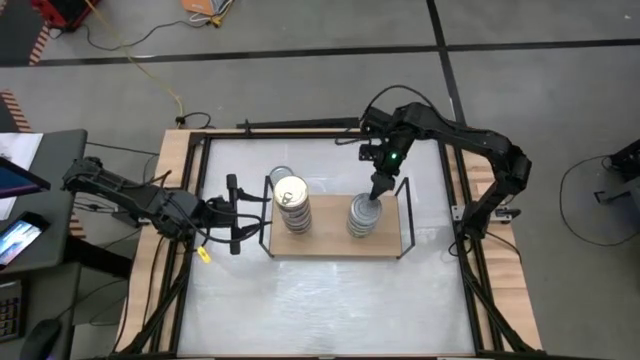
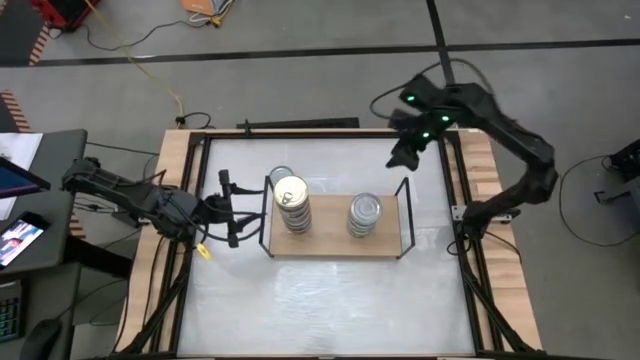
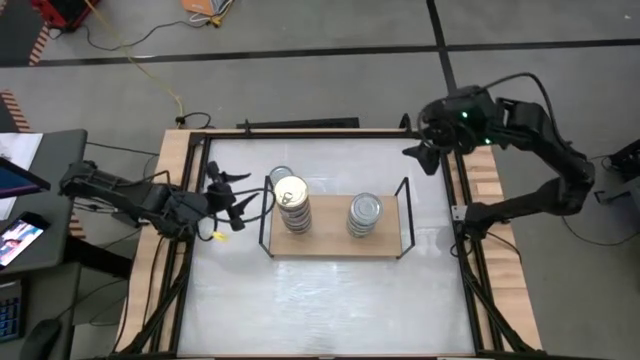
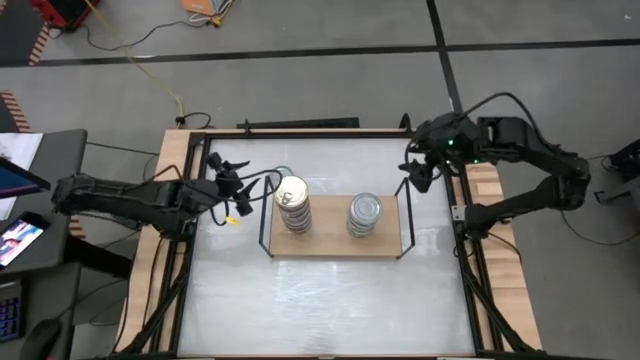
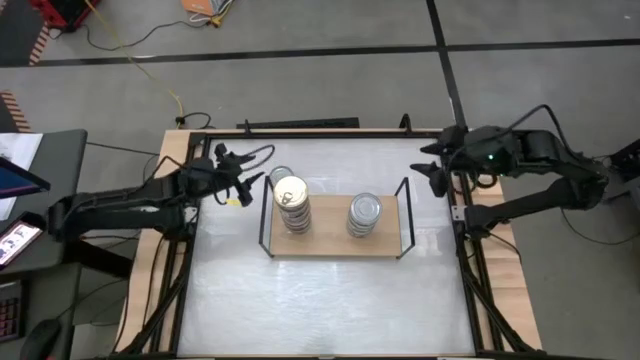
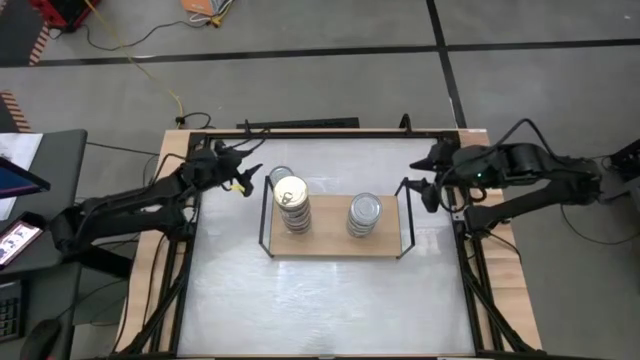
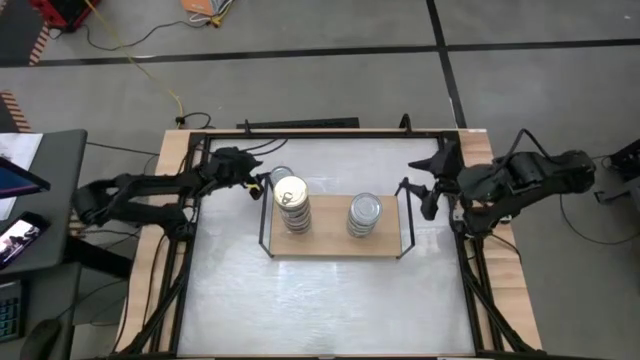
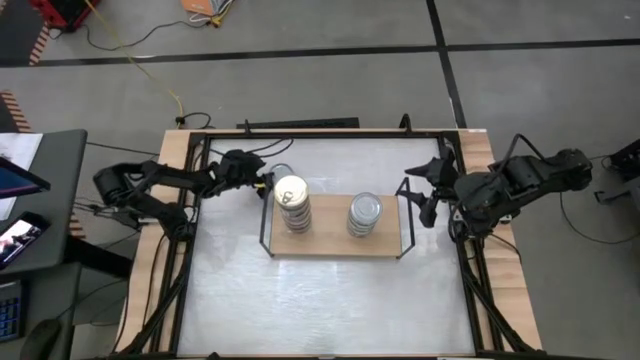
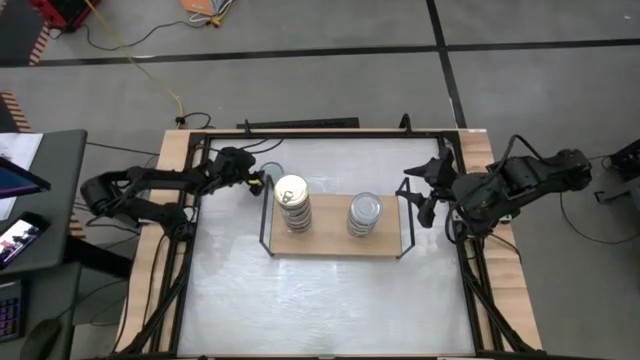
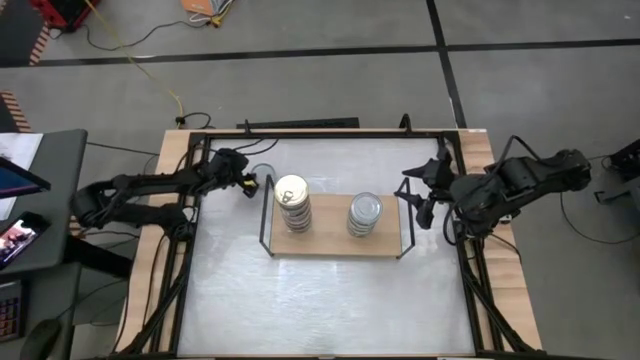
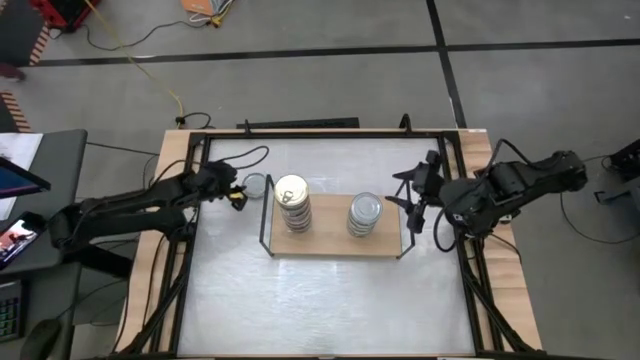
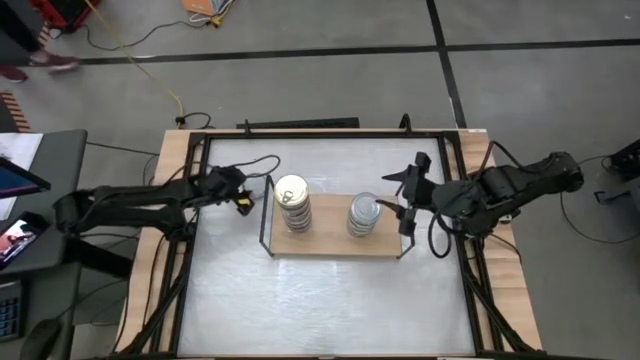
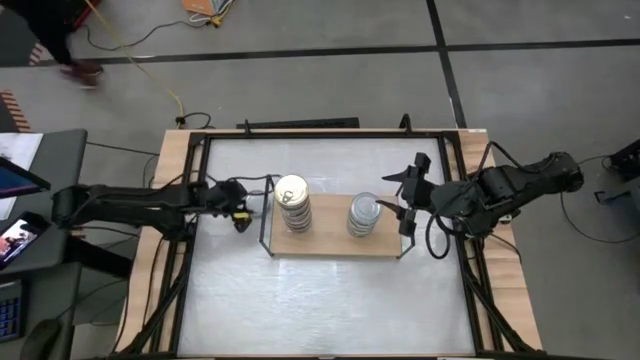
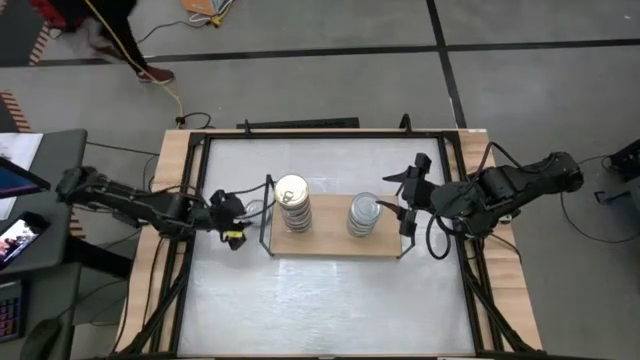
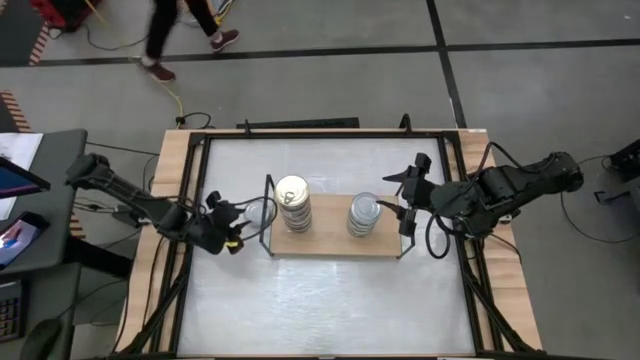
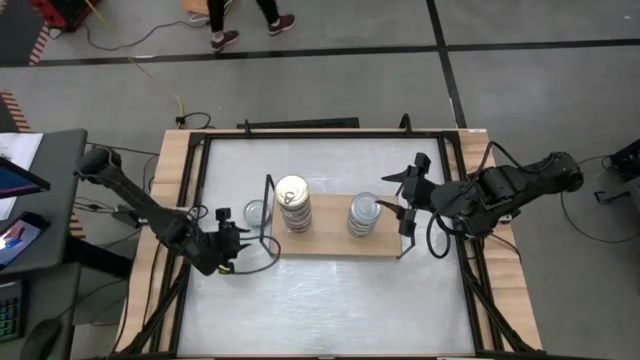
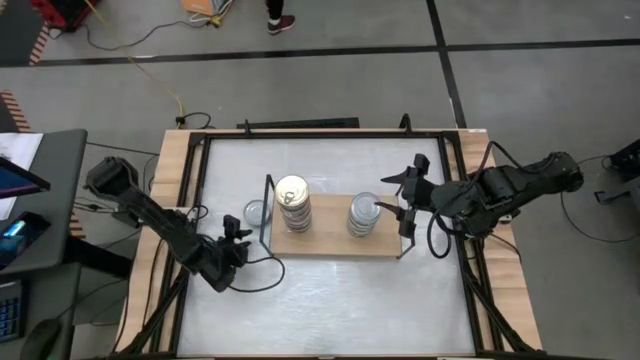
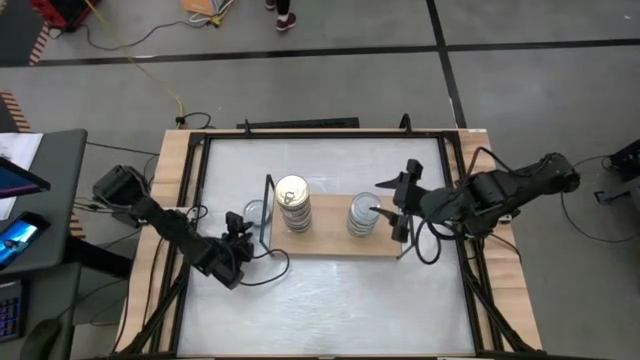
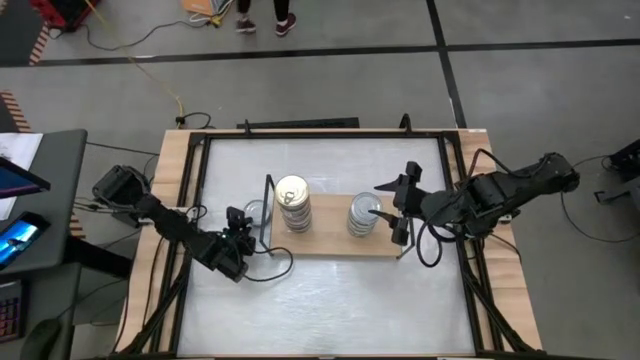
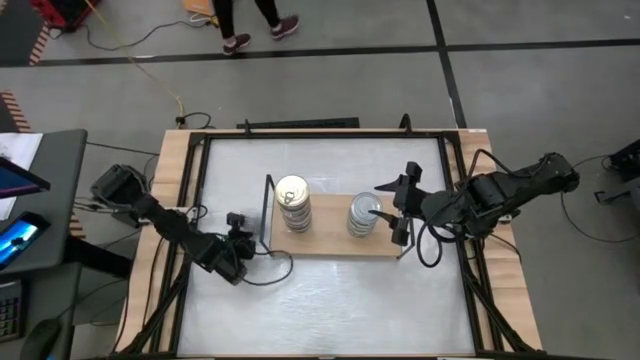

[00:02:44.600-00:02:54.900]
Task: Stack canned seafood by type on shelf
Stack the green tuna can on top of the green tuna can on the shelf

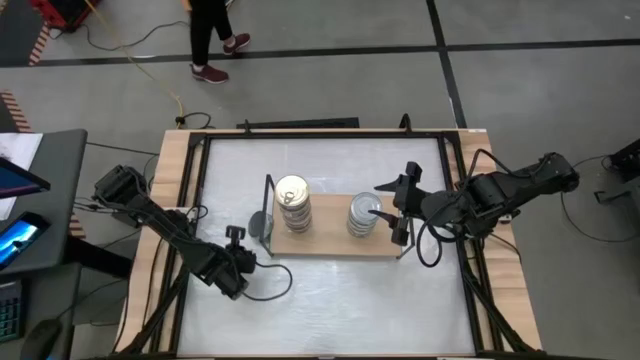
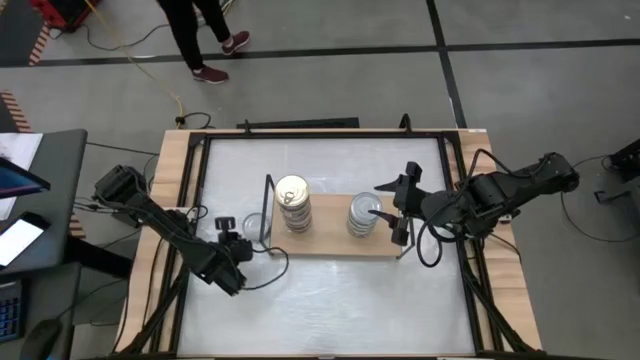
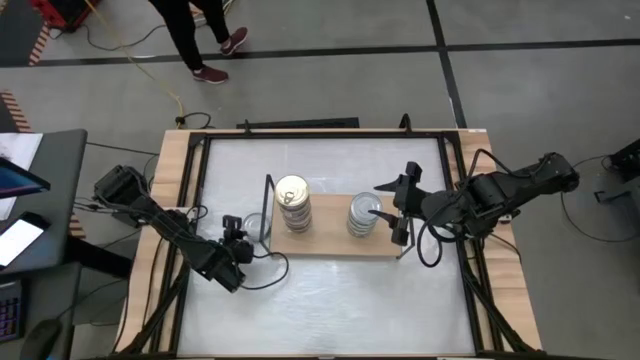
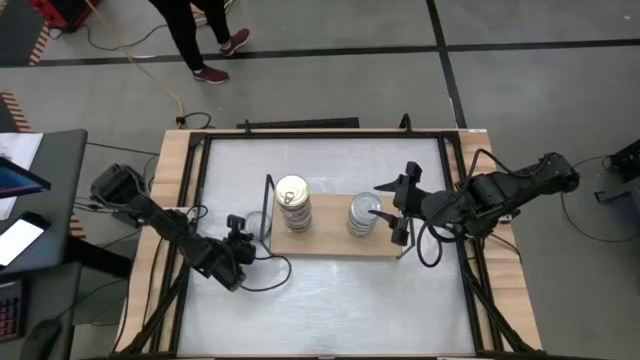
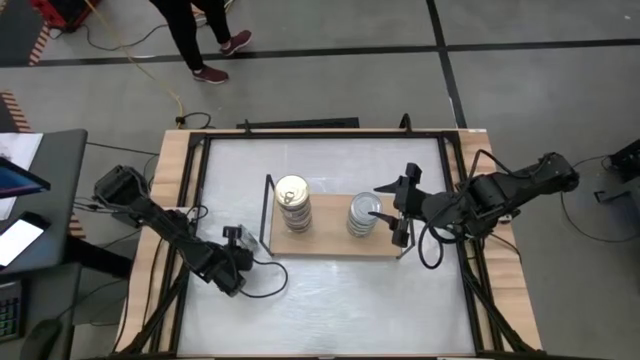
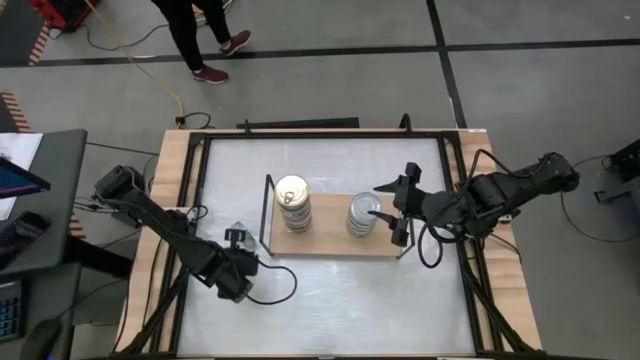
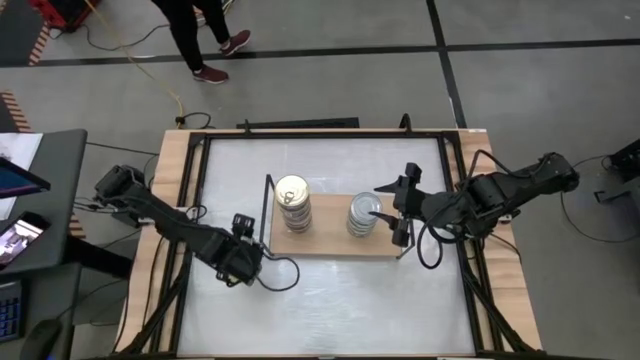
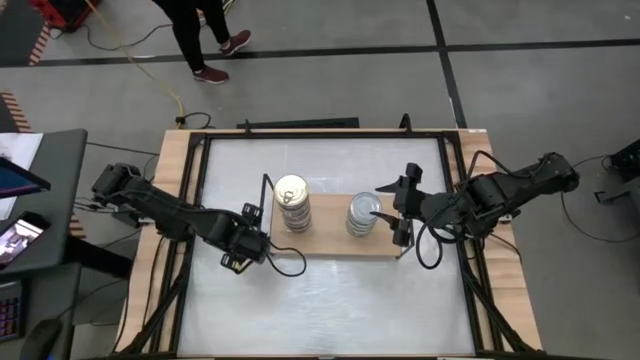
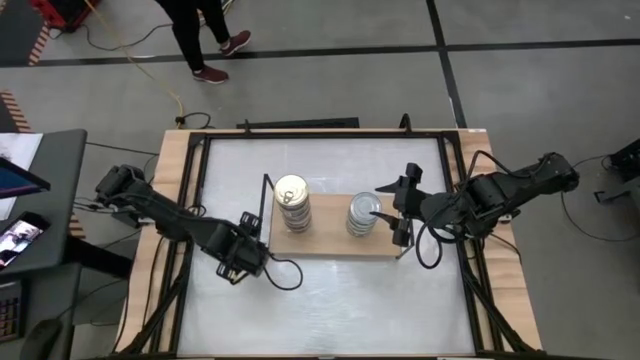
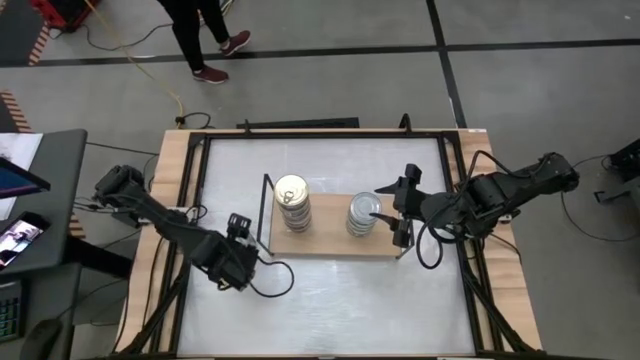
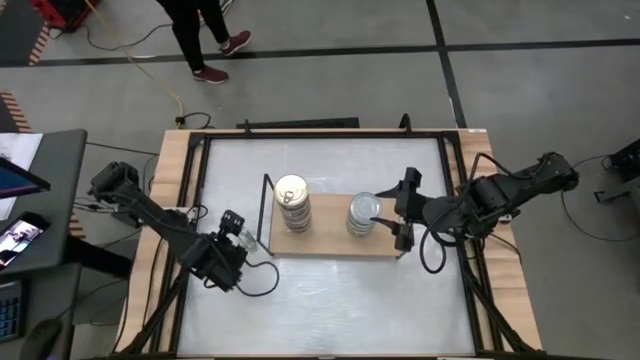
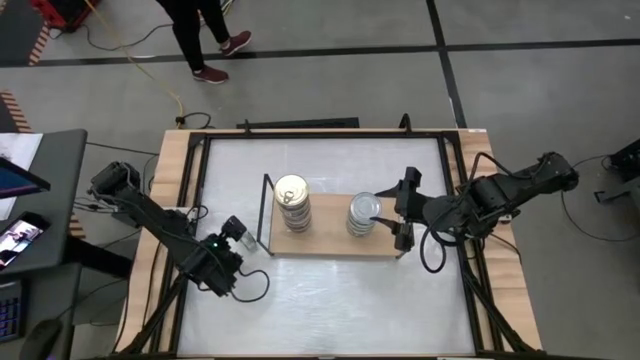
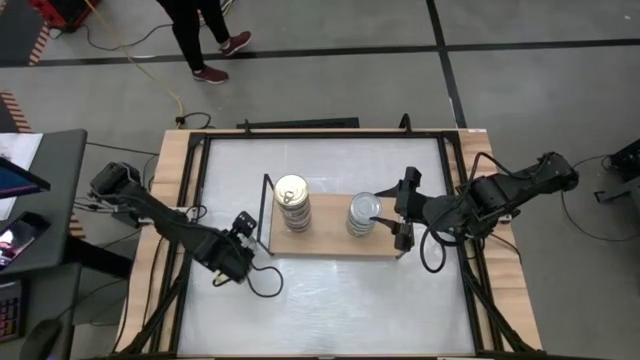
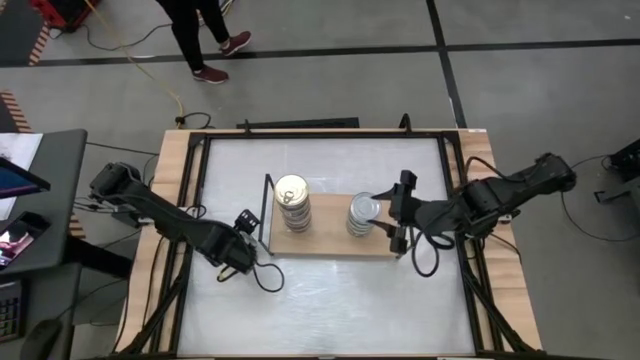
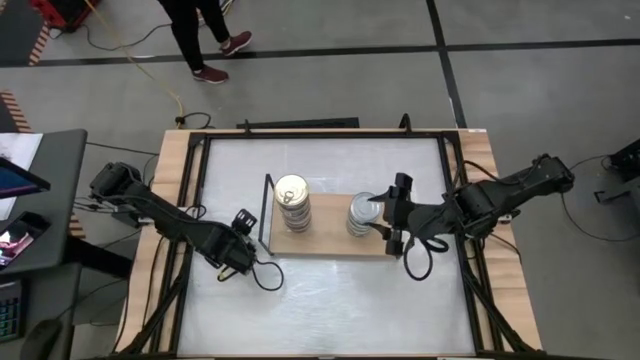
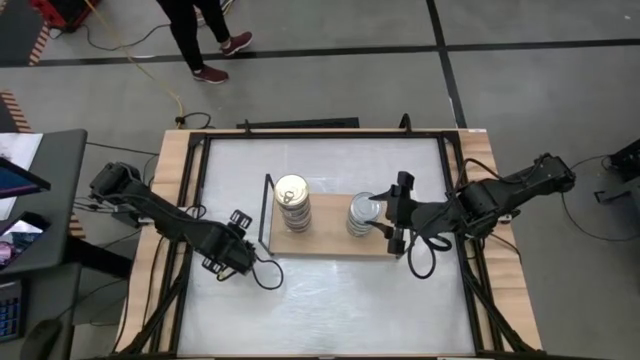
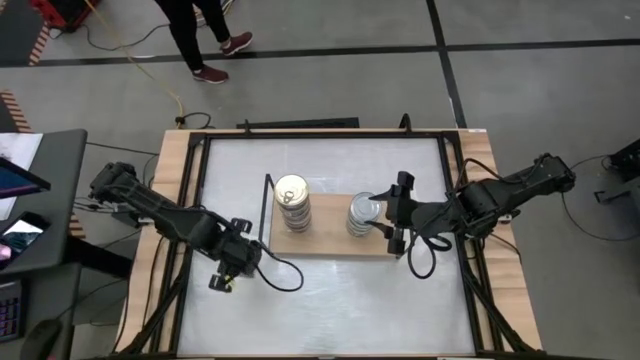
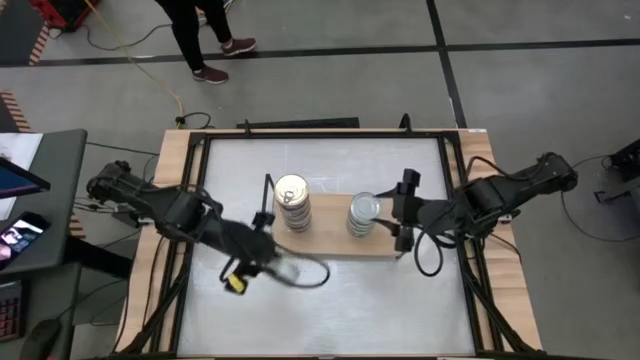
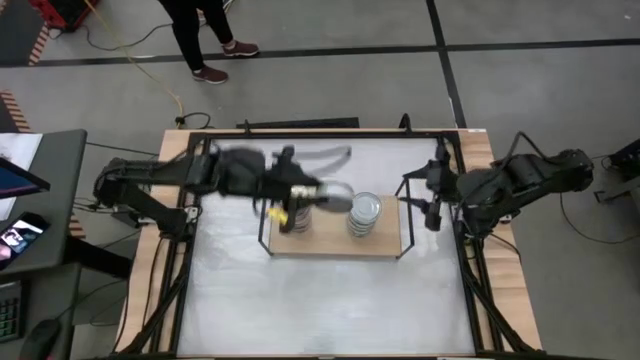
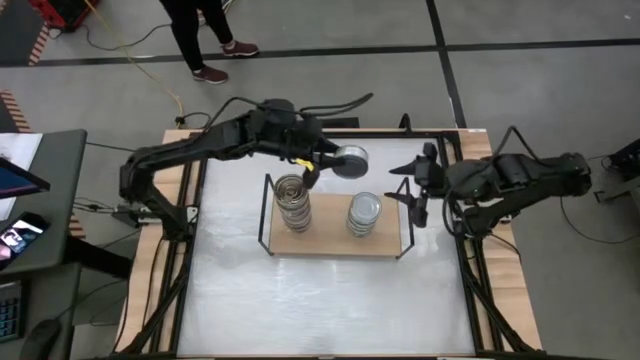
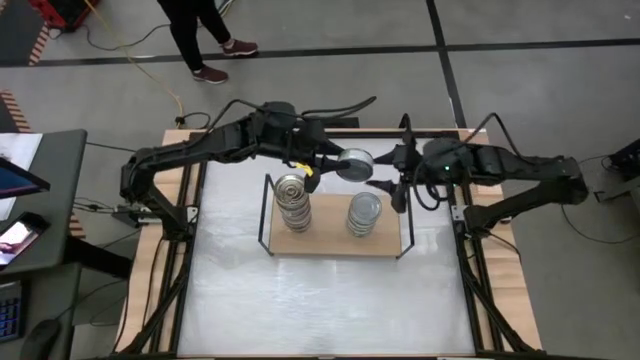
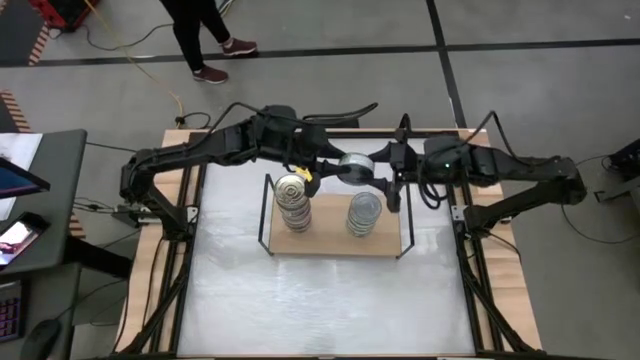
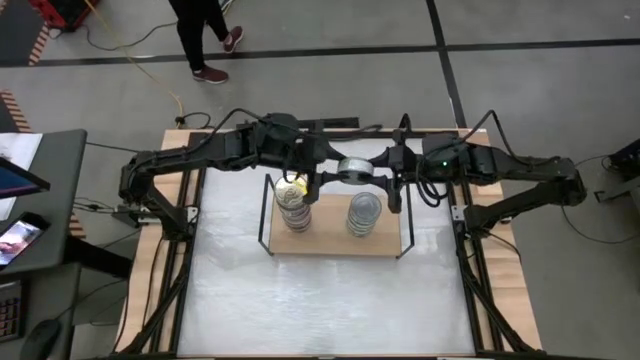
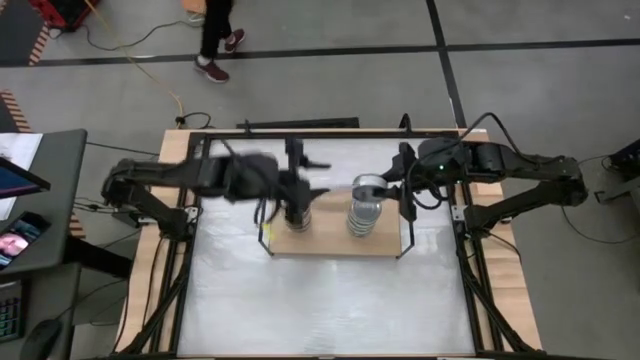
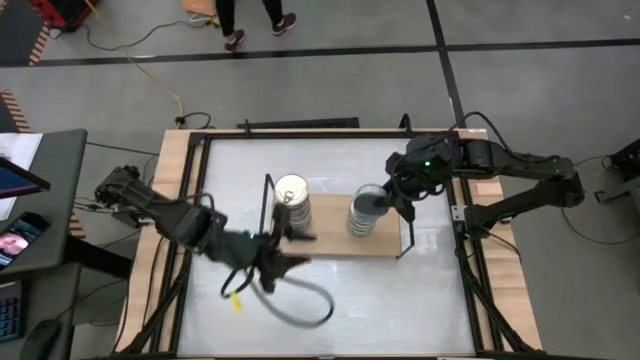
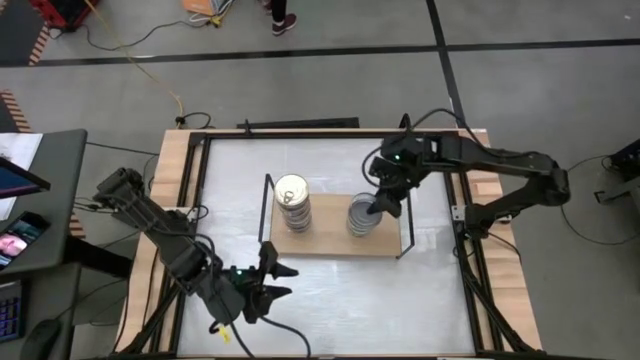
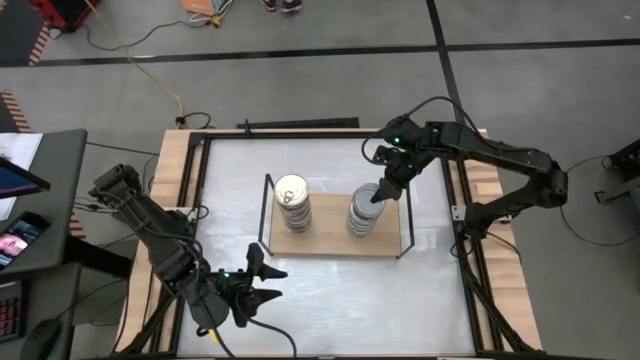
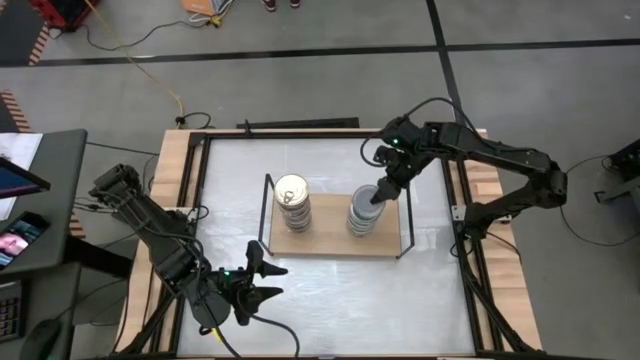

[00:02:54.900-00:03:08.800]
Stack the green tuna can on top of the green tuna can on the shelf
